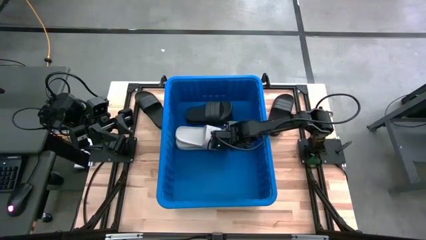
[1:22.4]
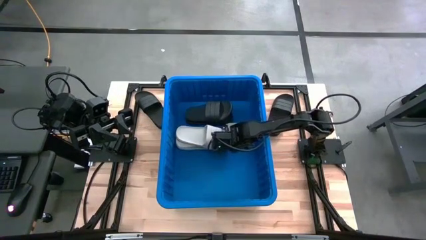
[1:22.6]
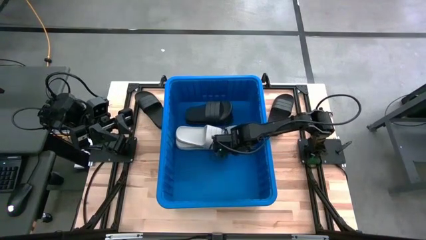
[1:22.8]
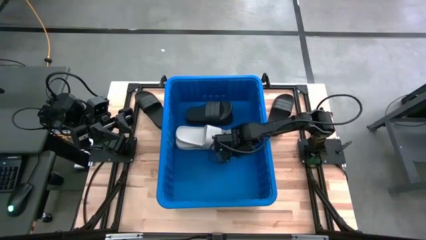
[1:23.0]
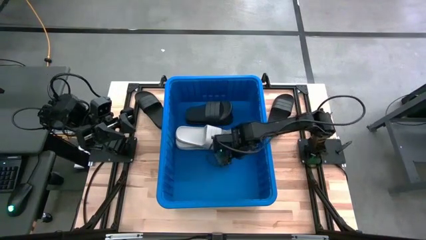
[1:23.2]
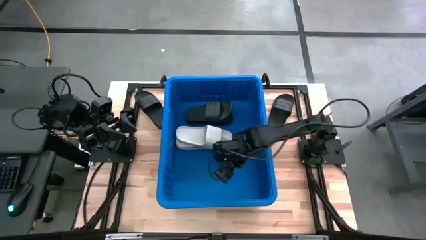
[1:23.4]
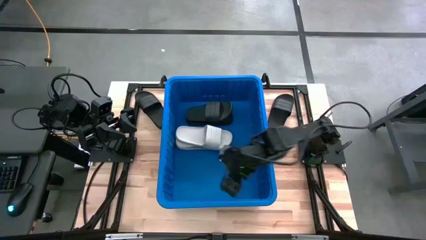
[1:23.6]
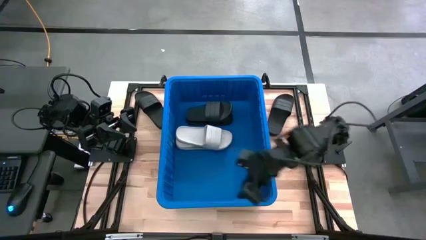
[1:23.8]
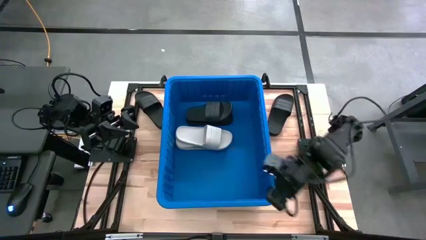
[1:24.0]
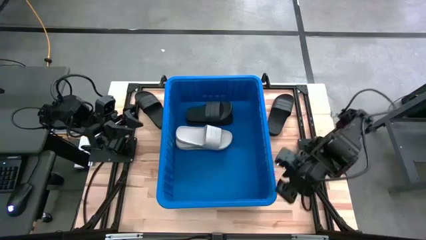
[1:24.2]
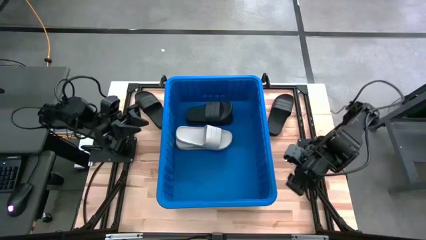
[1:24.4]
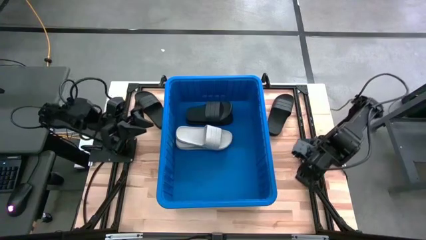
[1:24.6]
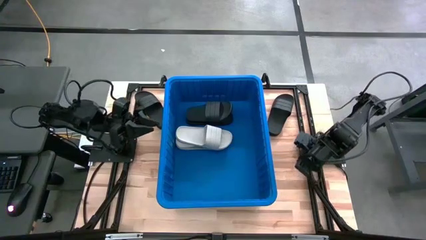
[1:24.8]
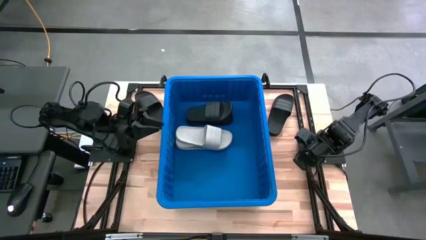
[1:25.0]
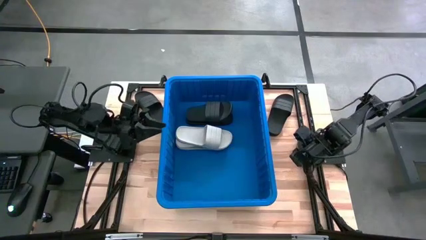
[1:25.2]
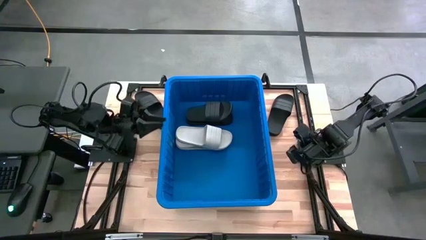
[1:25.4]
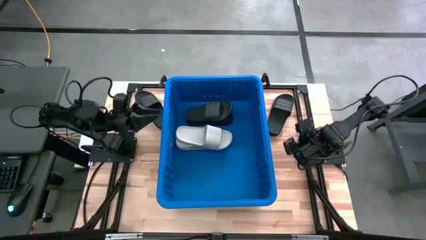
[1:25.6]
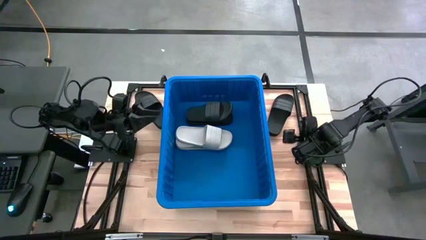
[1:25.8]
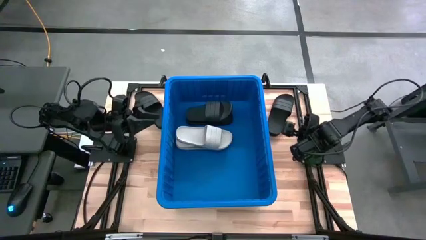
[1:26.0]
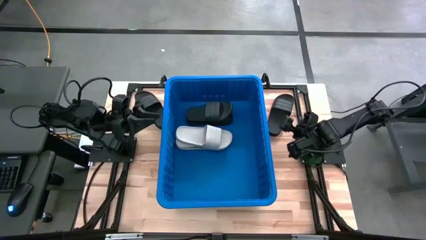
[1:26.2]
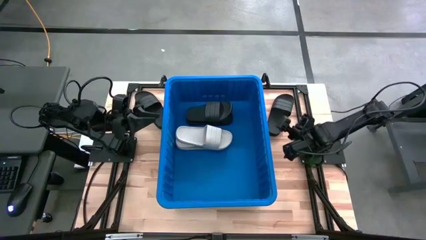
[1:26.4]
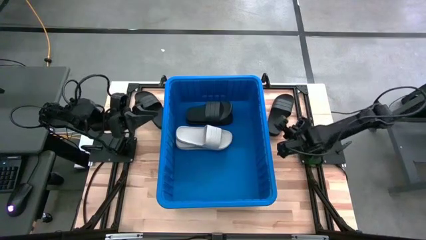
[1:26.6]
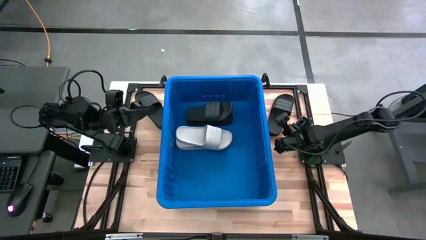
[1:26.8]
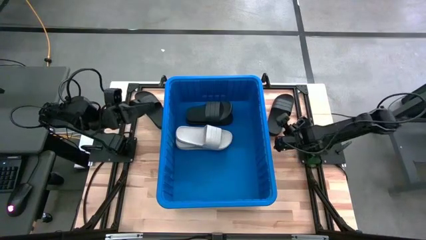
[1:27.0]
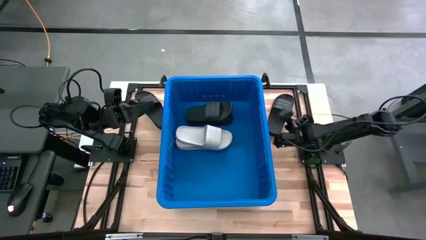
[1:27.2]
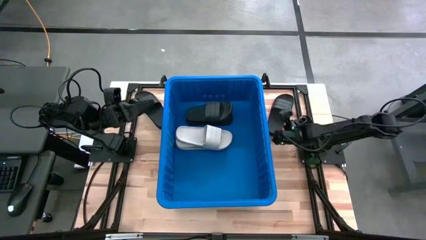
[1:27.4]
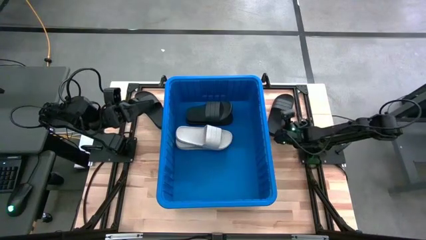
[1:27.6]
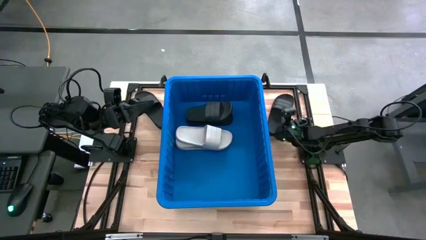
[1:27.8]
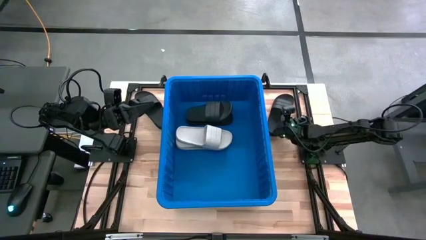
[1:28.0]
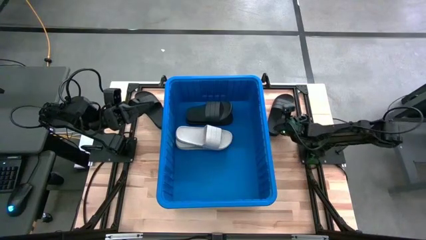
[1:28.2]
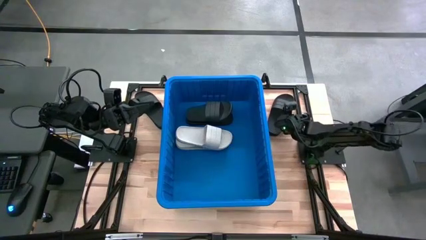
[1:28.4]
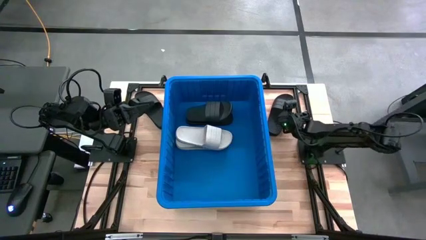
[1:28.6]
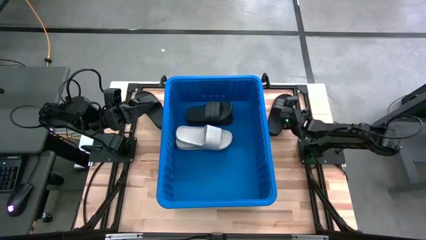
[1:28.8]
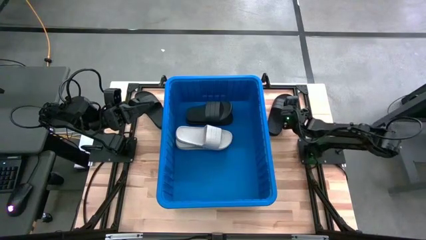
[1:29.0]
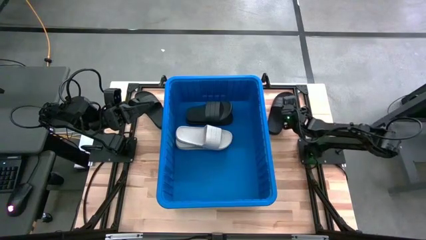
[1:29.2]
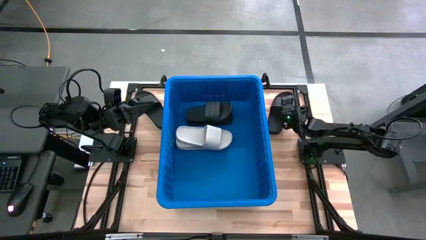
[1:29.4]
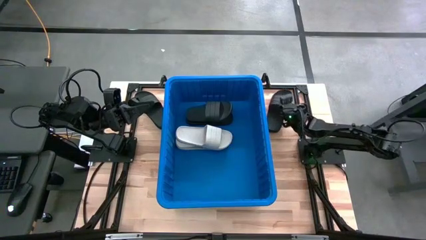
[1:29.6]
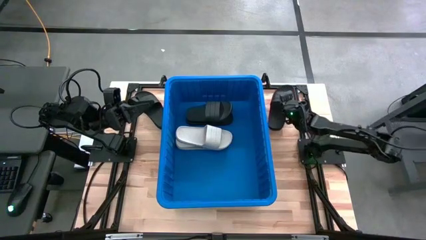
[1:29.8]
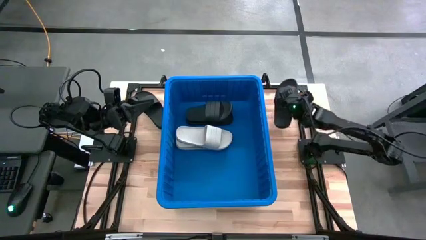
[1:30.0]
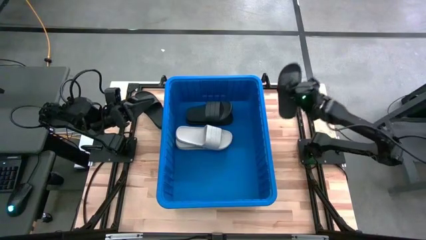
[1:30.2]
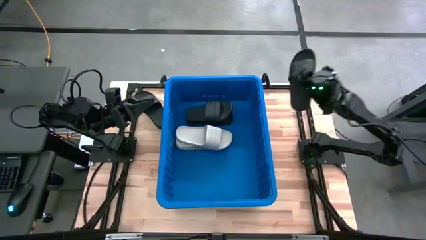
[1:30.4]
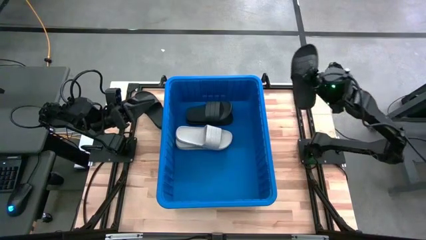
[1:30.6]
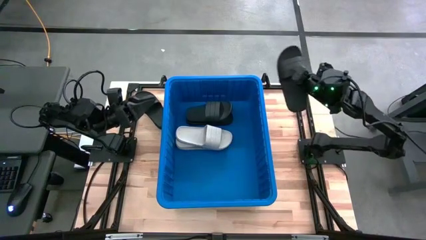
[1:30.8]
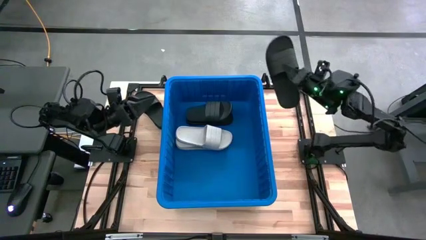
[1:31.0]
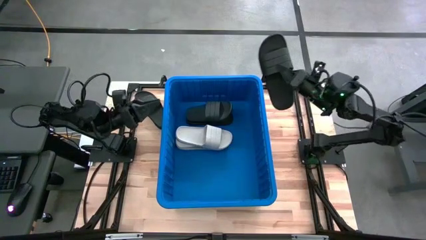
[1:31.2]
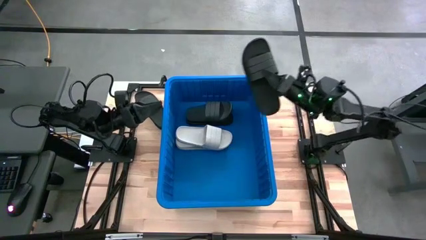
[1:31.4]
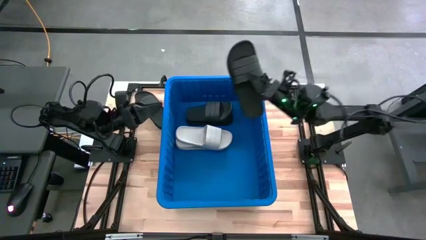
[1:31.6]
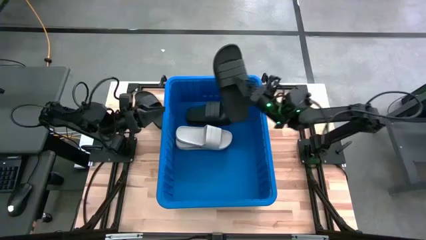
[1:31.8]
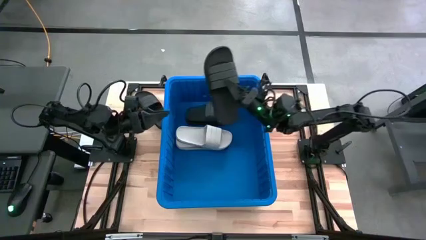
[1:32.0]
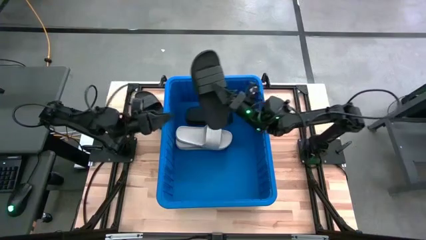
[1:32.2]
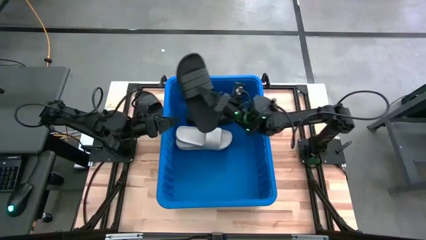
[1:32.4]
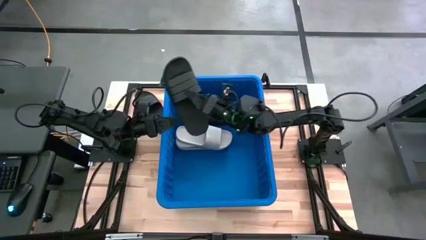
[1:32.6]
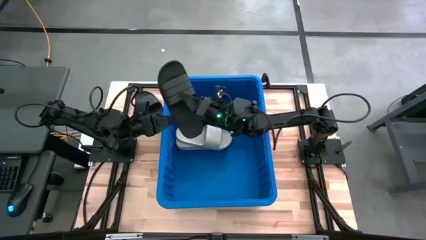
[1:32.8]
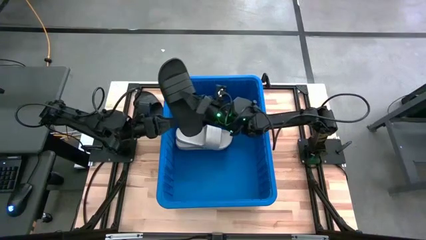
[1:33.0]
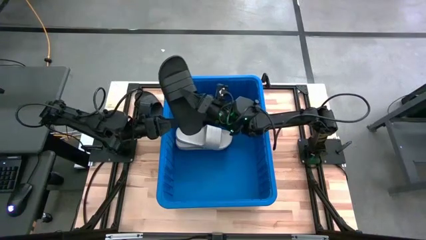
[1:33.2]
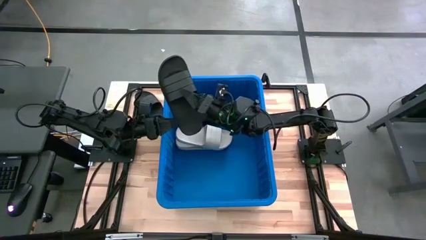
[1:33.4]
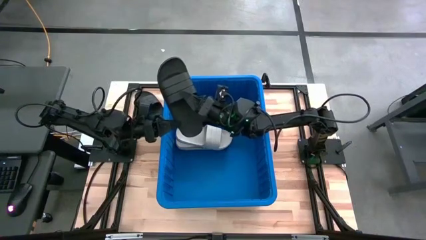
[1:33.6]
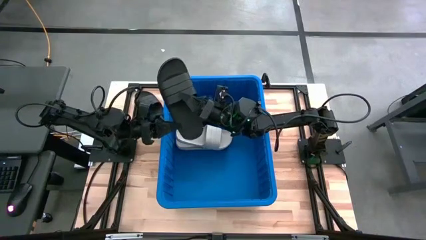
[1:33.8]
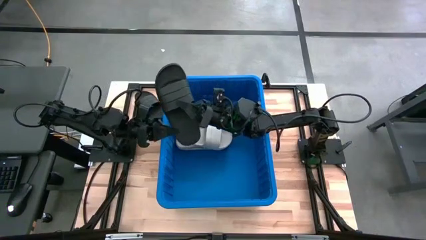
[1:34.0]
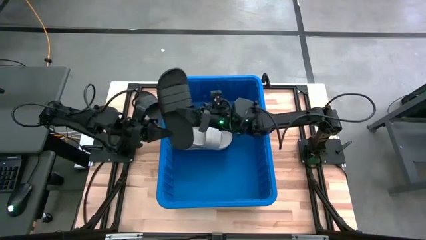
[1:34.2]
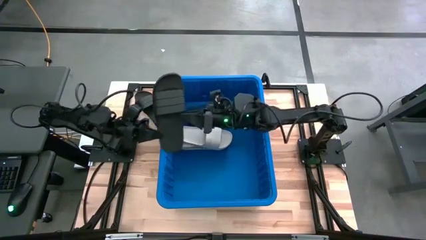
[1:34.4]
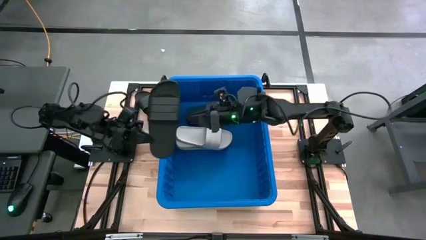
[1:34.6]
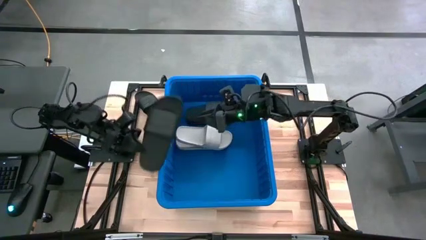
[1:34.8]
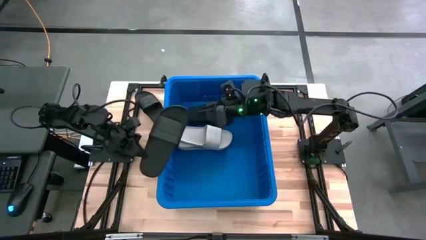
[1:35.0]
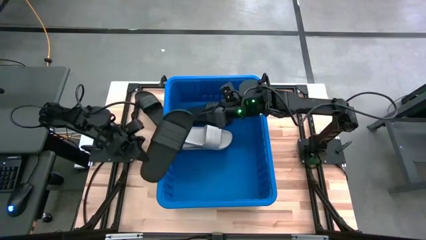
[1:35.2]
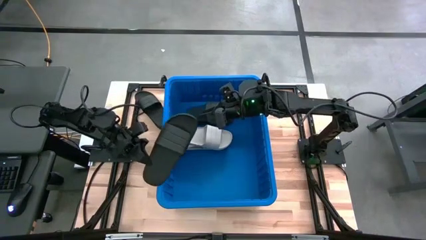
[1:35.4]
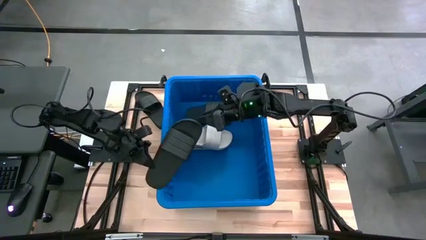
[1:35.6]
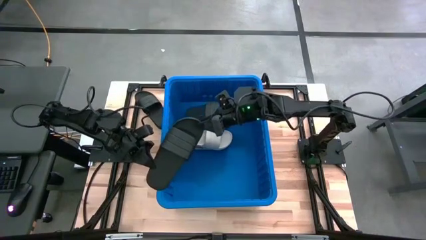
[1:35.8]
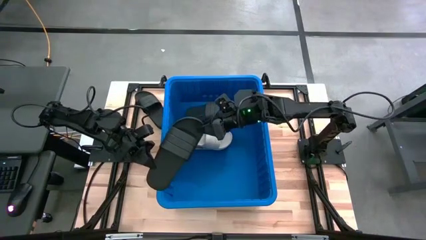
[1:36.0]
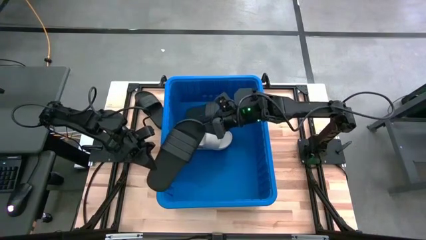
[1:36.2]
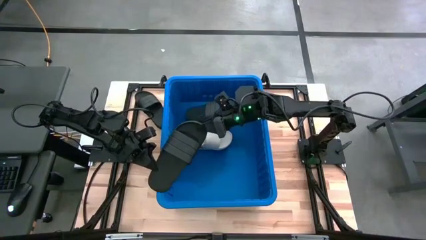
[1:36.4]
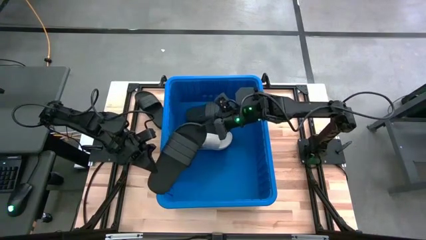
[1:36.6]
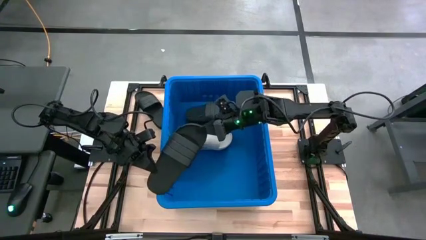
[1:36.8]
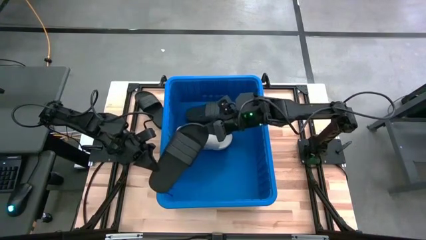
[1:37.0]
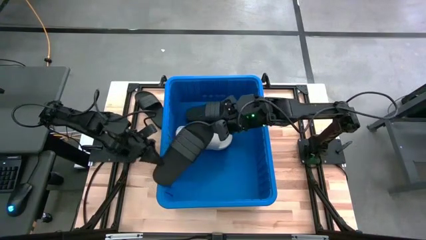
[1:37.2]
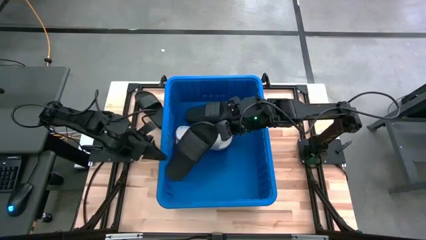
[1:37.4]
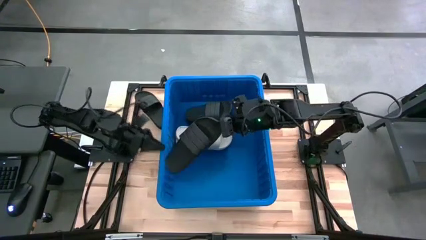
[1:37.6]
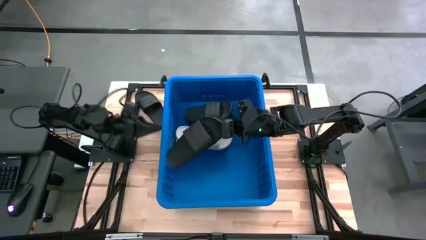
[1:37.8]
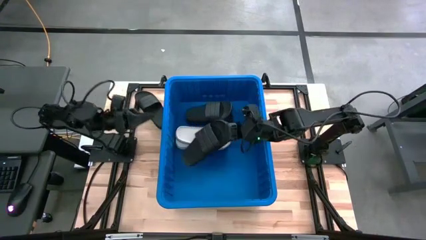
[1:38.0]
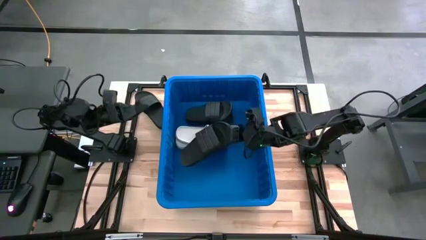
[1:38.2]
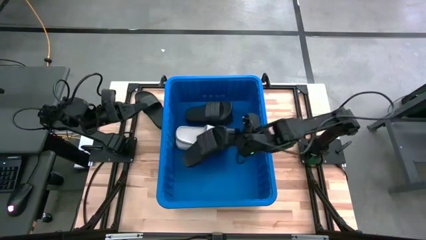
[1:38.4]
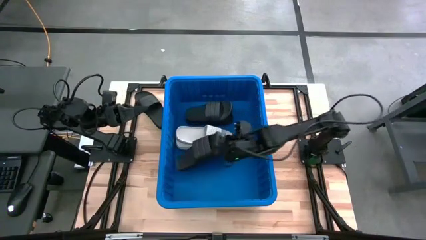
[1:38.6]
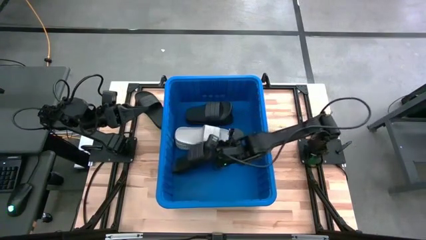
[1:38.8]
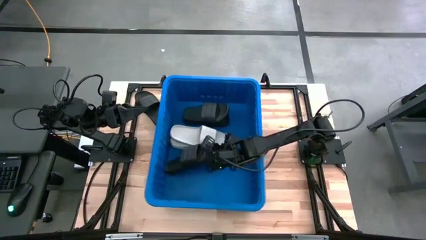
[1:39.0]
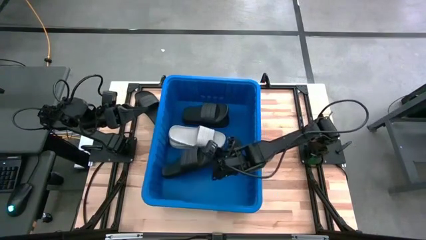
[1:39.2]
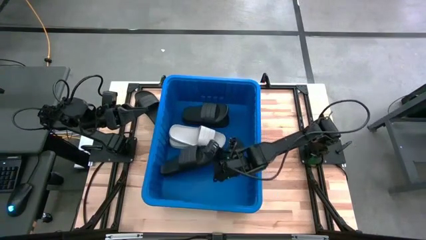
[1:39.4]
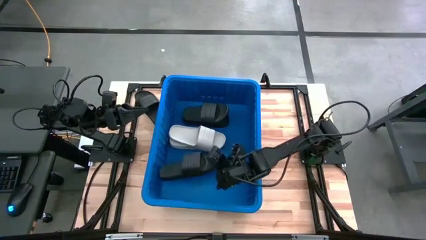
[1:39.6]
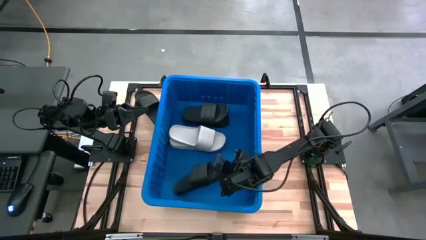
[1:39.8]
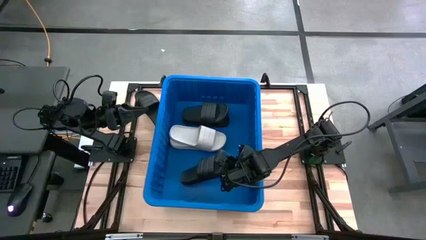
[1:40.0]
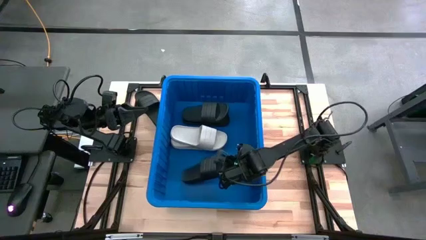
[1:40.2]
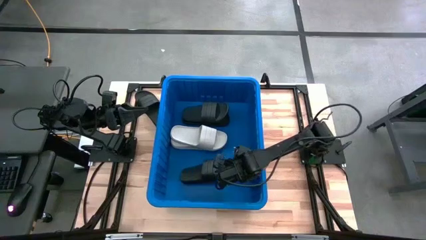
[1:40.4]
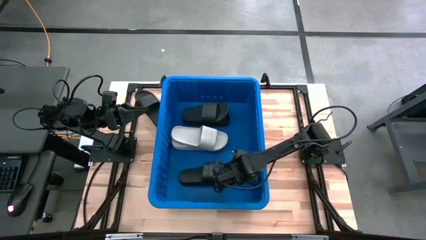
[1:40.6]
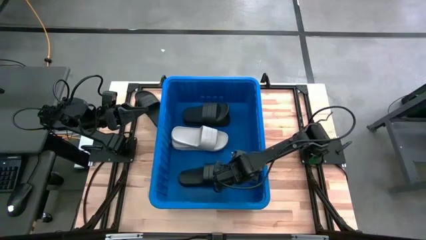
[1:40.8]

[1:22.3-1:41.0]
Task: Pick and place slides into bin
Put the black slide into the blue bin
